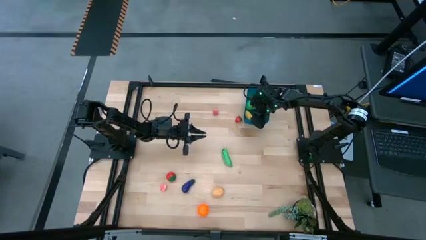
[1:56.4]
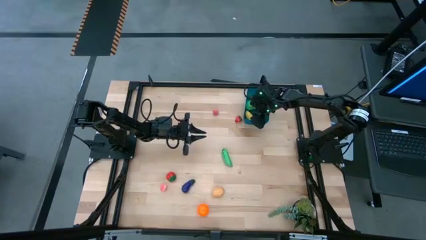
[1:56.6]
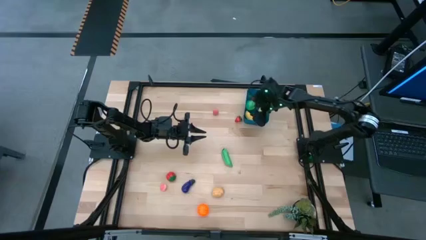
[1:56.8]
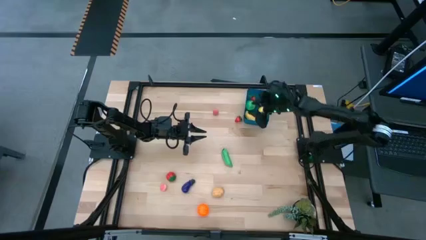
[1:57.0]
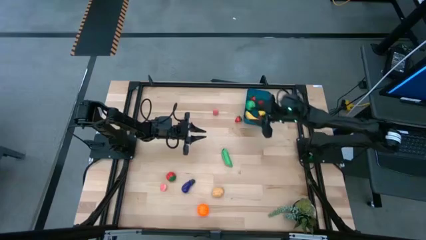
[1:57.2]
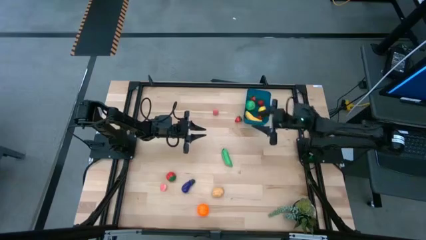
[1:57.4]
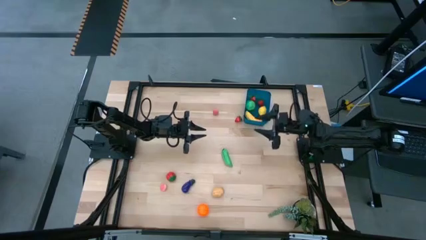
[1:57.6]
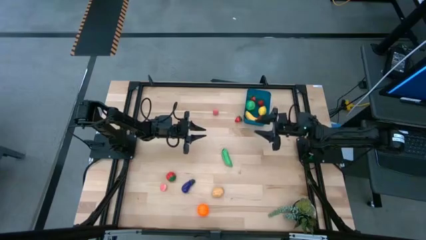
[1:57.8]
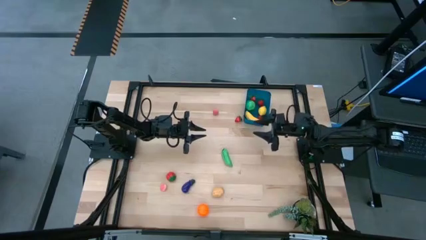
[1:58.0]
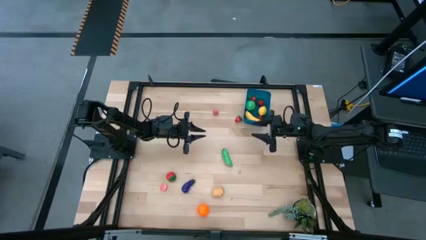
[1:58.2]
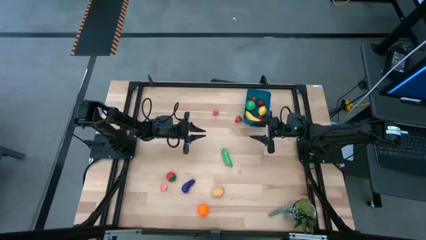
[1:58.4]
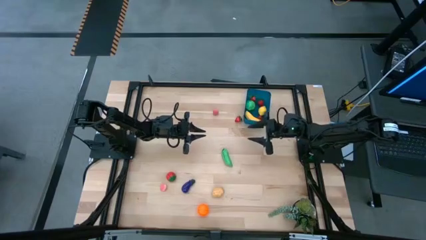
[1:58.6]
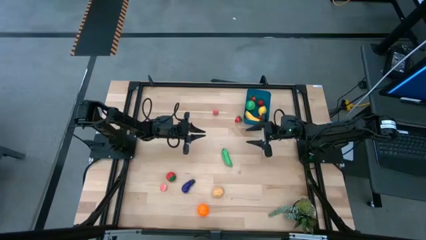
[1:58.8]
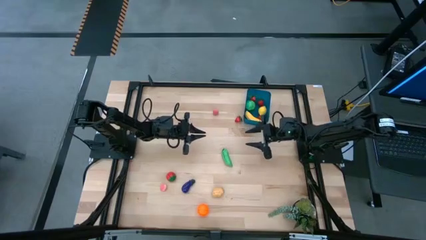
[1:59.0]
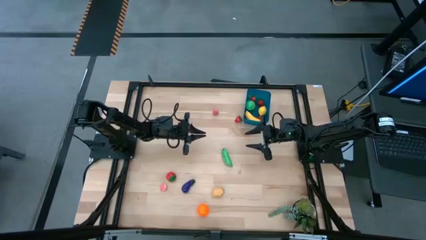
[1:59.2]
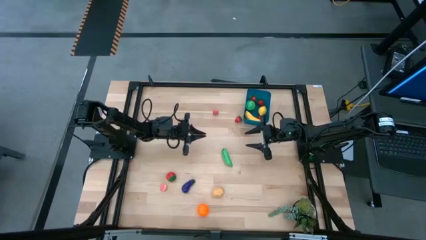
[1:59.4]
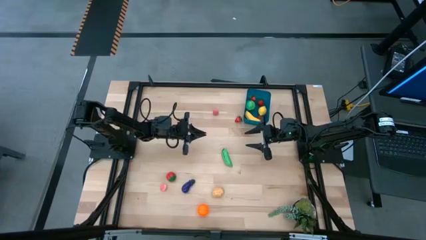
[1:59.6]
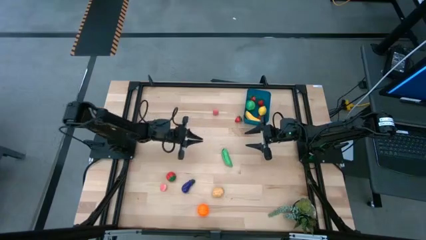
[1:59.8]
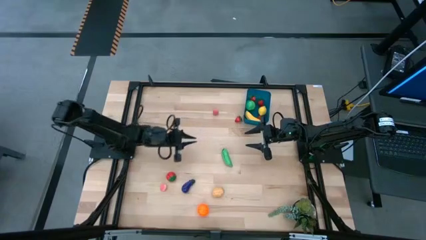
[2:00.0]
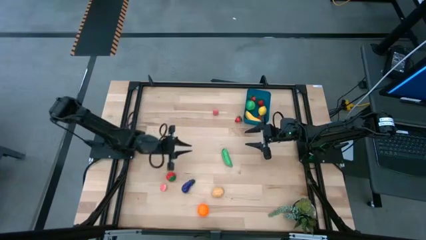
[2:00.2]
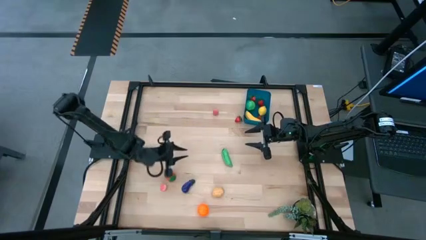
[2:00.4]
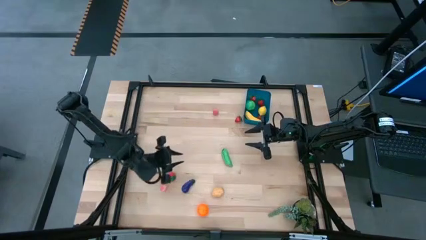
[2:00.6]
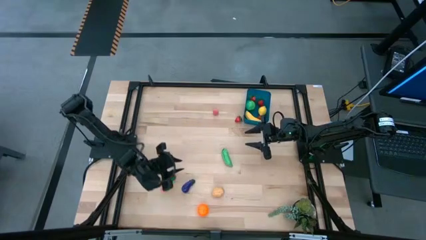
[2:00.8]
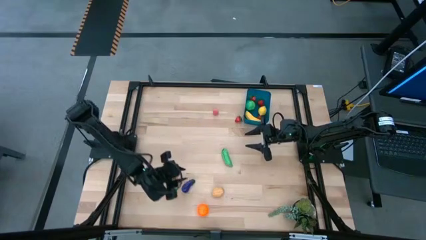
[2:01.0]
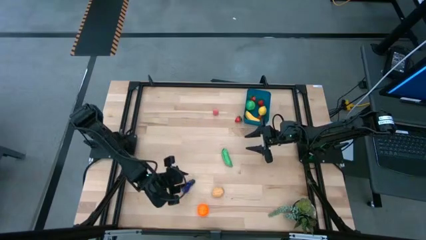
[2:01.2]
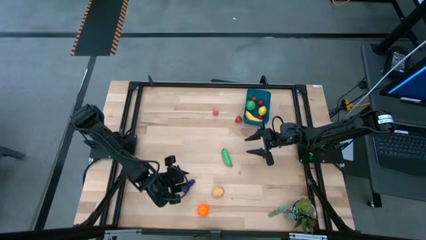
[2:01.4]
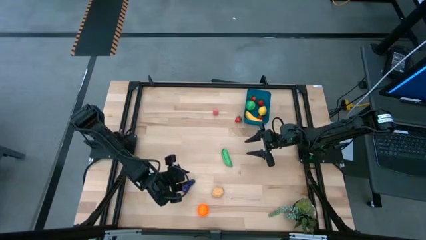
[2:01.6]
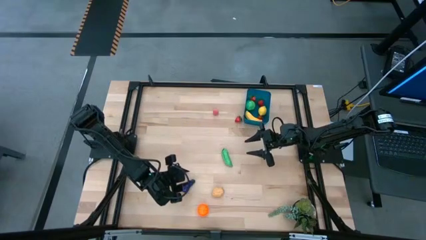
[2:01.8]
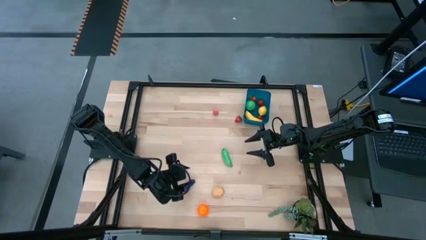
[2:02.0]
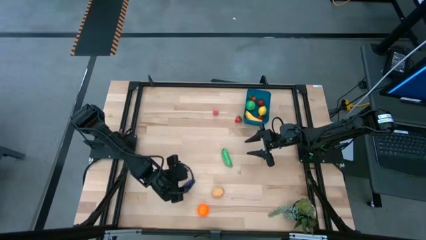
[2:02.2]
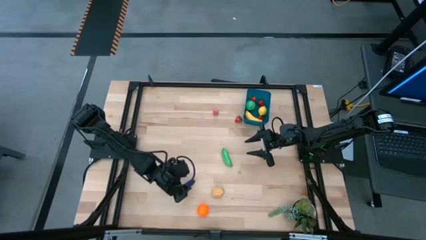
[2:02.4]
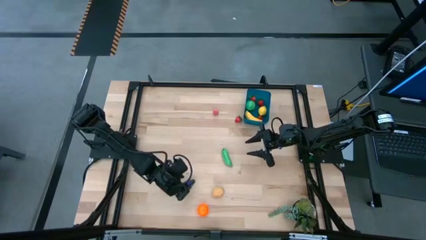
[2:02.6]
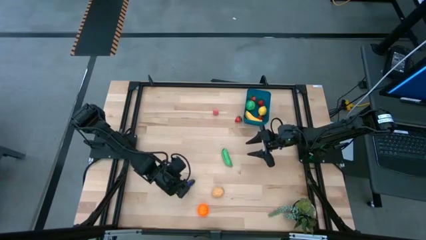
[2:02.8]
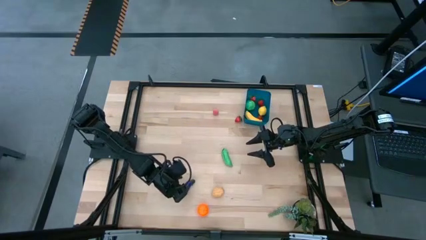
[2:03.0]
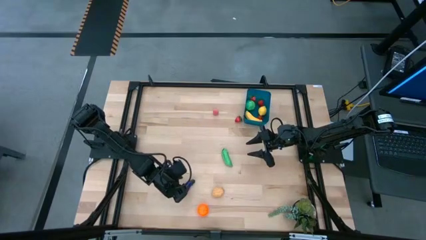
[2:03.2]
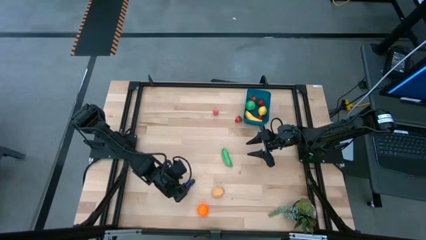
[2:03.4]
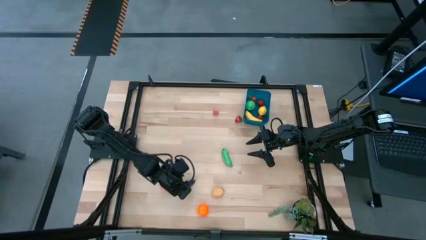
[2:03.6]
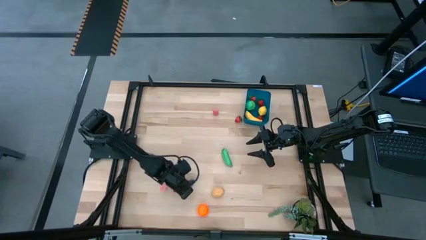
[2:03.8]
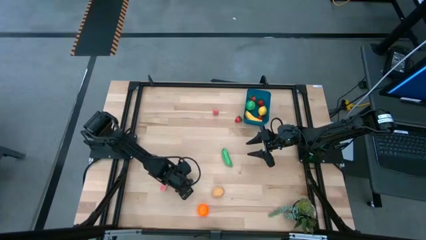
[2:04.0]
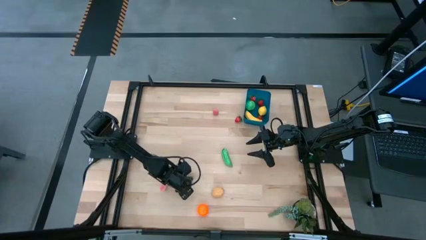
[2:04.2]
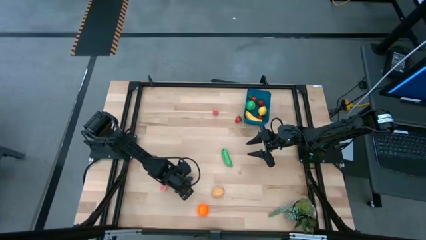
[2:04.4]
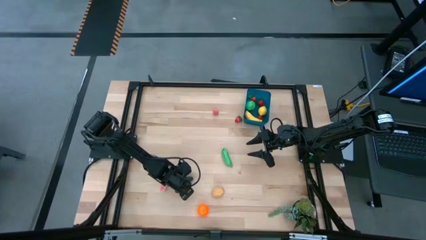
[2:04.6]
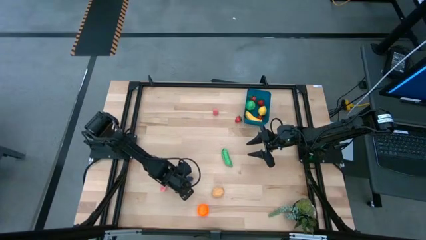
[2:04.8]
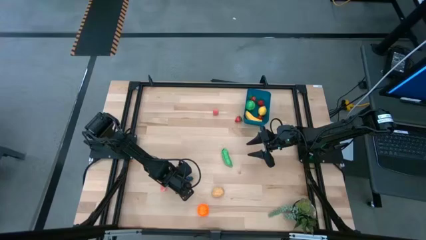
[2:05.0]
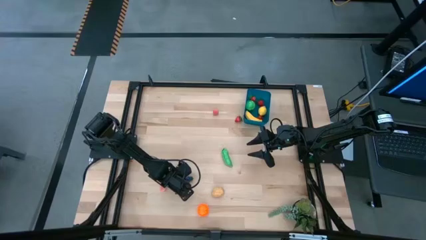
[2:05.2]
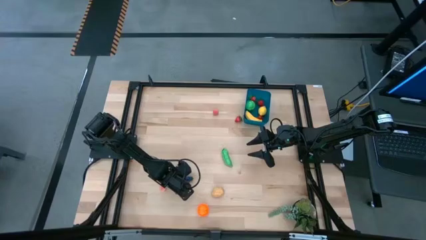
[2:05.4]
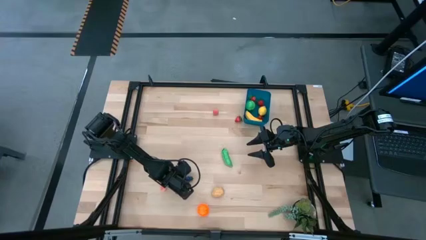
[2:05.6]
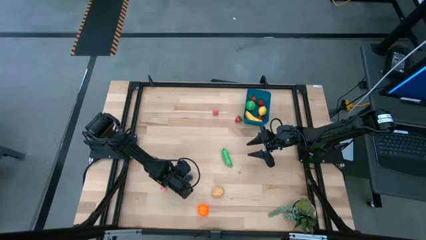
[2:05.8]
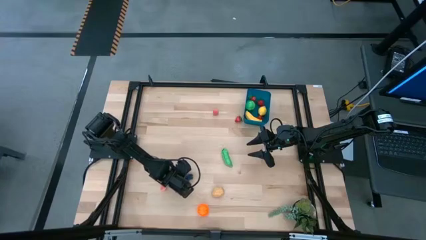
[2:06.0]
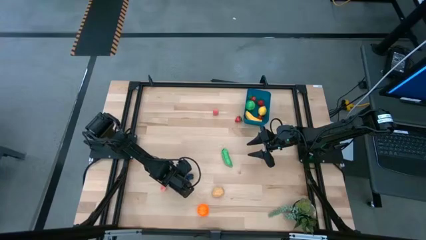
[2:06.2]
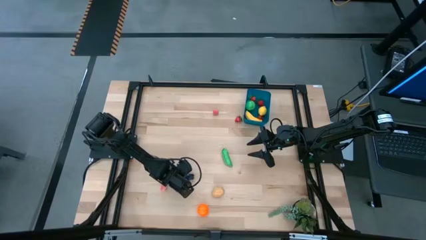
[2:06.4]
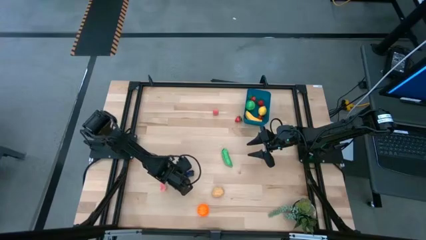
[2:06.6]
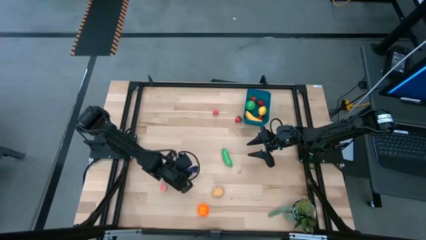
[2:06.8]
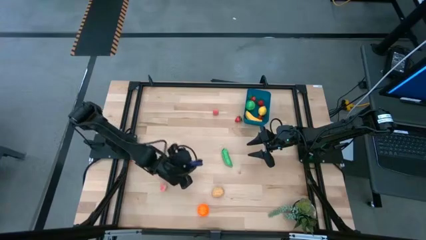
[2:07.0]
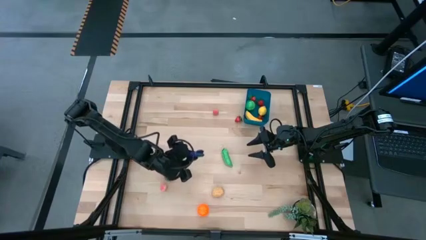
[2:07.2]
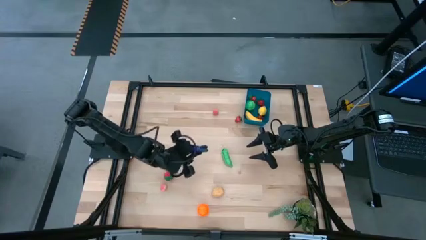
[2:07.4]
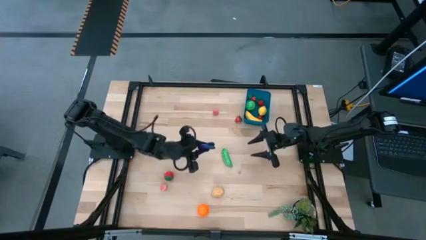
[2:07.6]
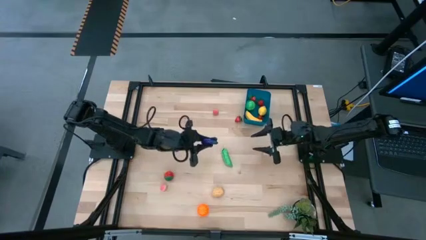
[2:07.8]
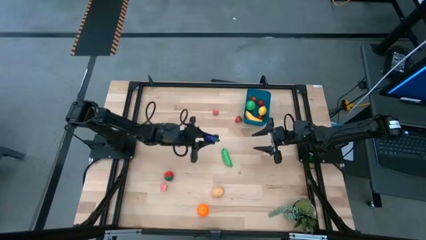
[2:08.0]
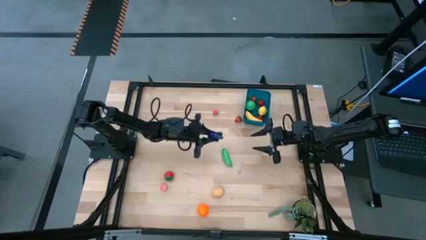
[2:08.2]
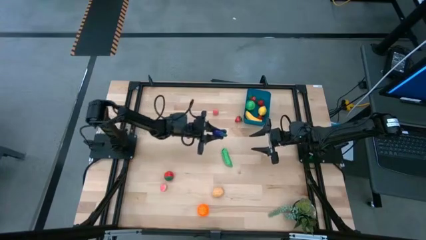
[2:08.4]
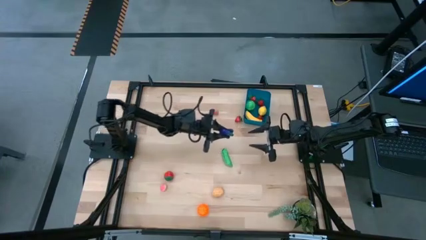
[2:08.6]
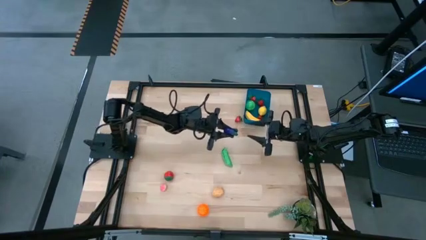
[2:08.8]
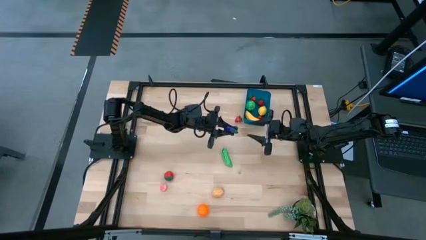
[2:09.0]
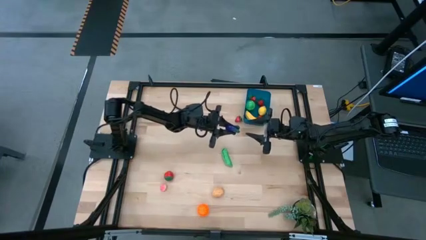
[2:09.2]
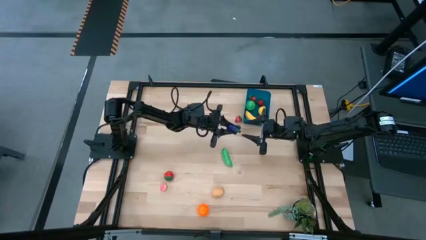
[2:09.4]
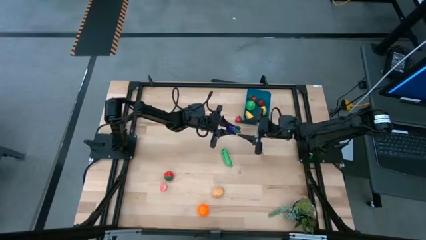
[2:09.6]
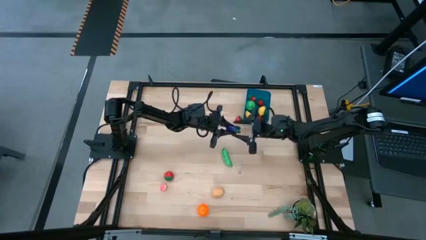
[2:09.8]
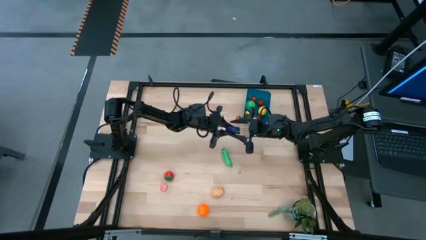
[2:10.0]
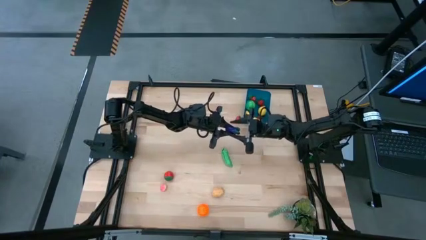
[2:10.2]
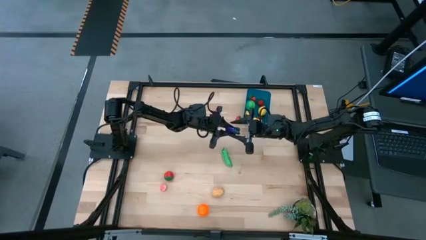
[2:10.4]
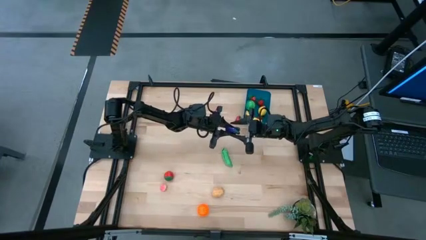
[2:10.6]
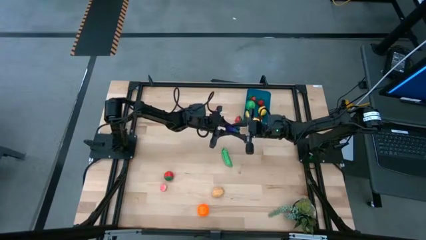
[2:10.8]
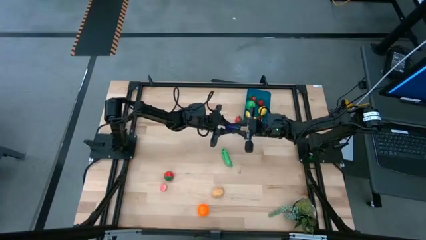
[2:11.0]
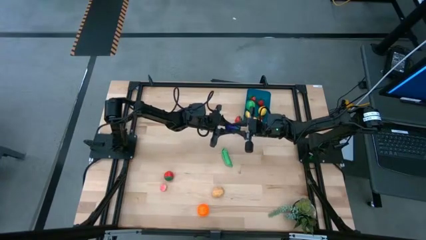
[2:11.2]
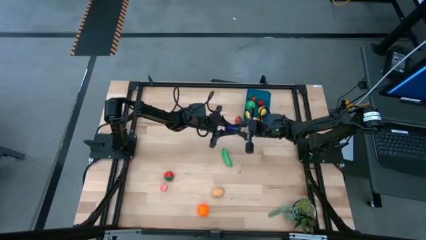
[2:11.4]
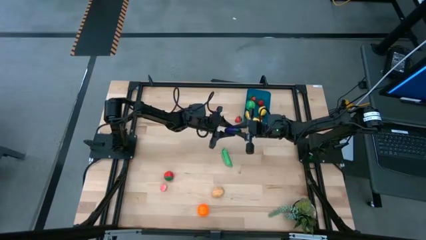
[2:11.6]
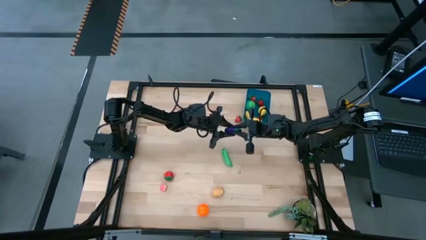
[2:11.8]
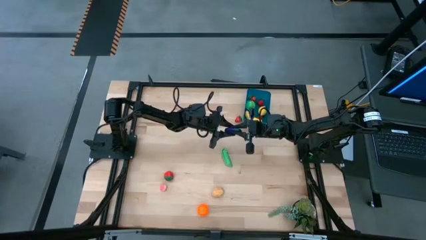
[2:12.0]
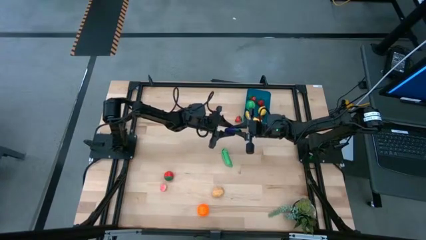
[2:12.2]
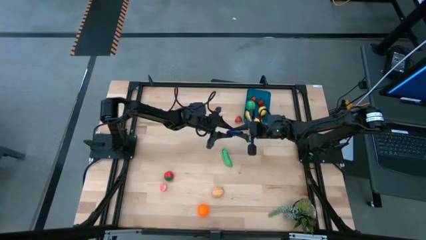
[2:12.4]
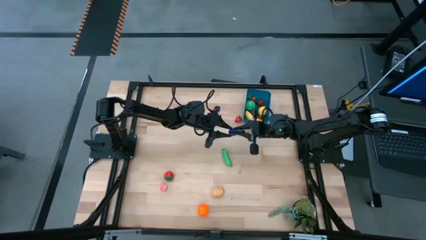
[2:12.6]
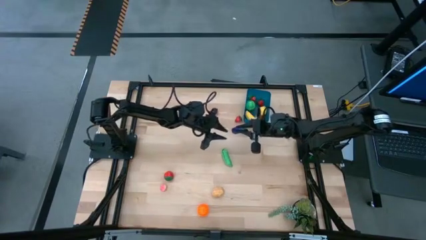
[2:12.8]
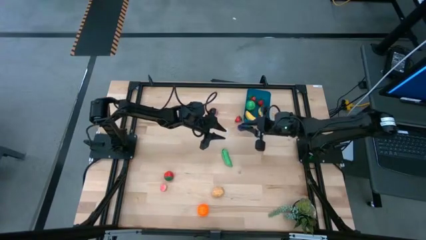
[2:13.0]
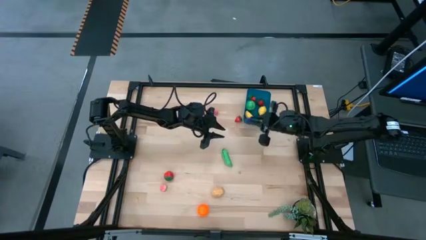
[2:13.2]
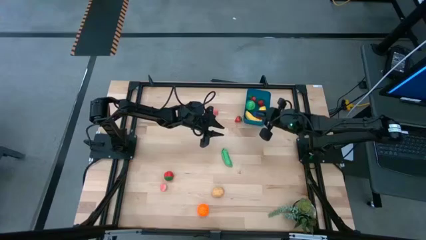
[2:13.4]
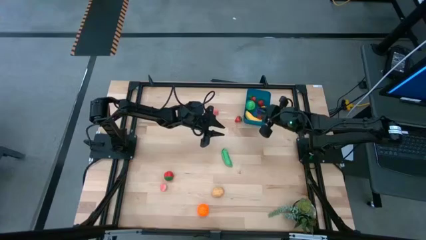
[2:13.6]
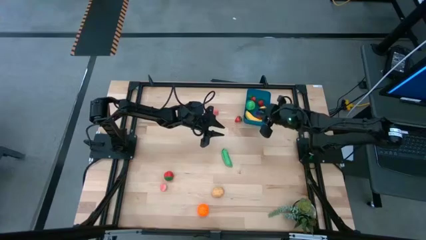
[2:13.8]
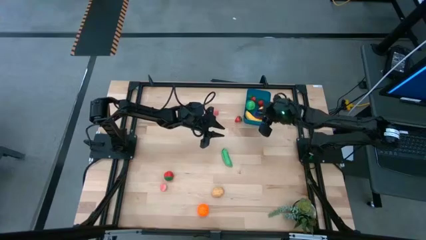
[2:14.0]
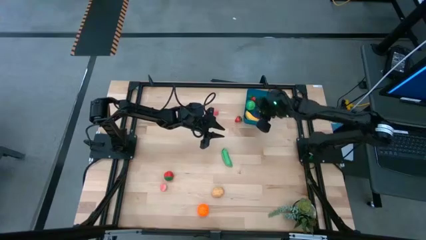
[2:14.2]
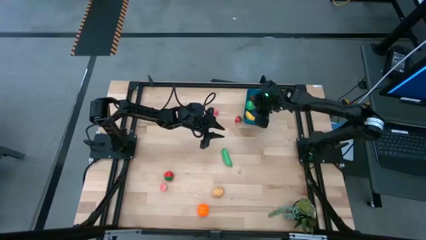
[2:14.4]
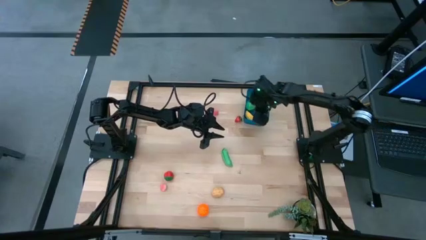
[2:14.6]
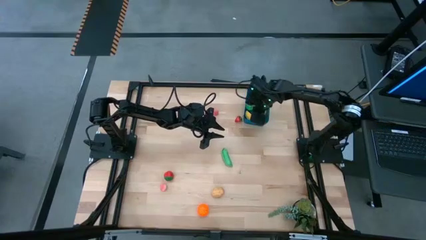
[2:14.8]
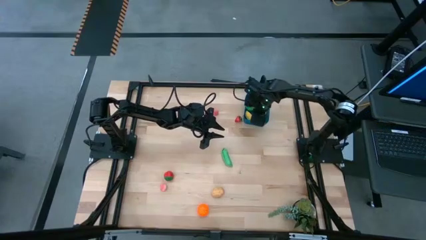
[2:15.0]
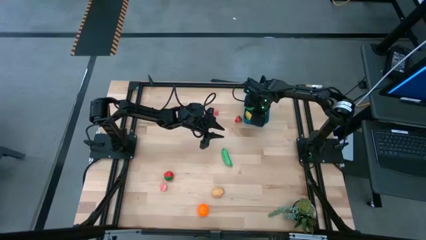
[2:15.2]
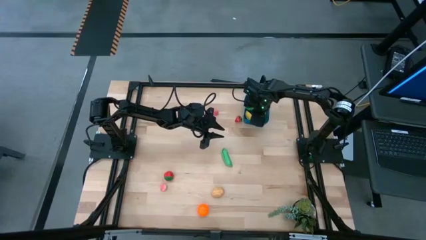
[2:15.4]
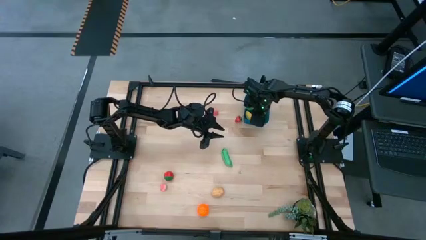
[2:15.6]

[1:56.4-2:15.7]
Task: Pick and placing Produce into tupperware
Put the purple eggplant into the blue bin
